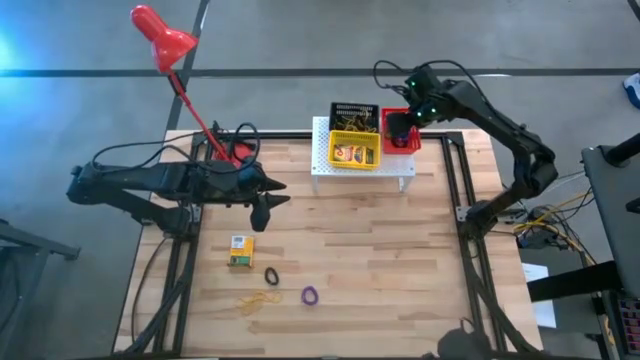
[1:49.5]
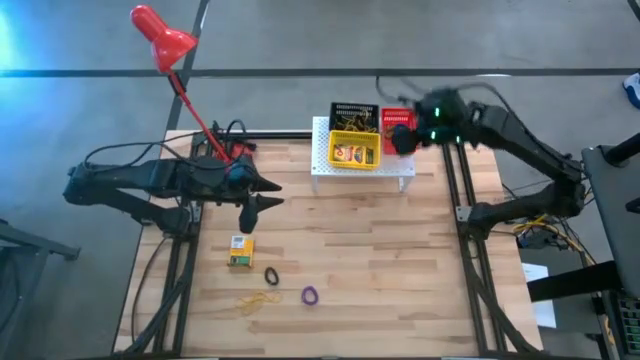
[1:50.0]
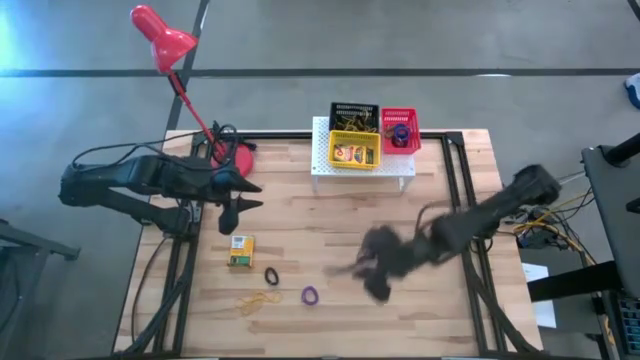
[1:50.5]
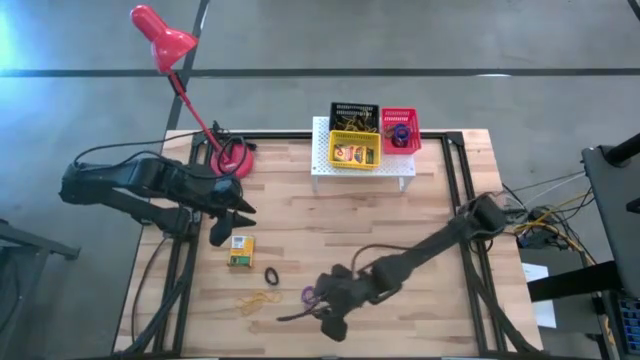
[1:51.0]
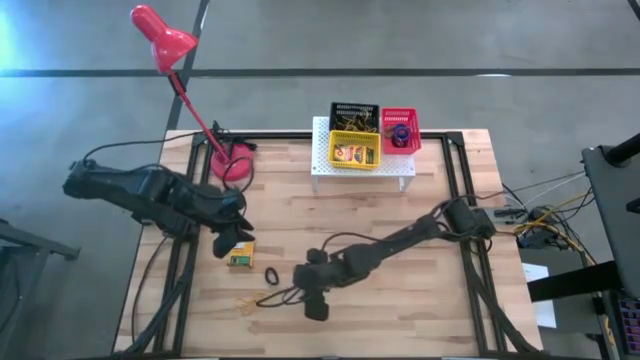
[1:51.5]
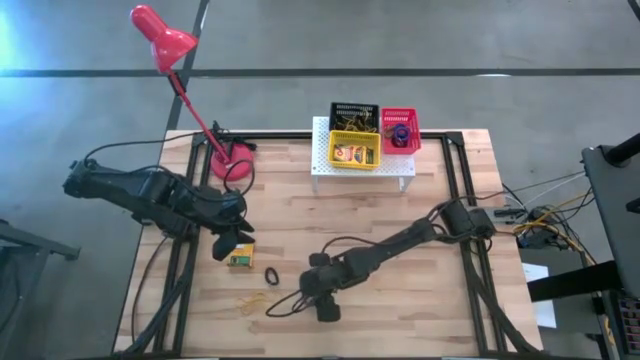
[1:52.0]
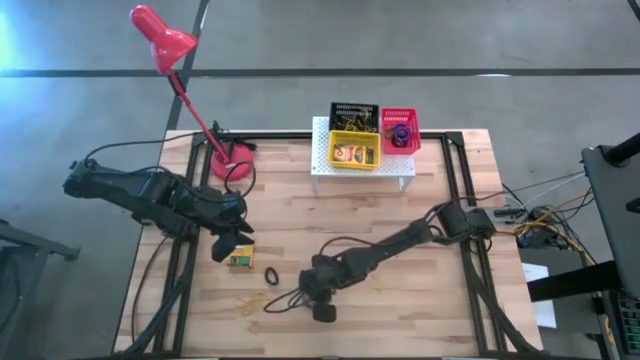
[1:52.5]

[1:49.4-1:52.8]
Task: Pick & Place Office Desk Supplies
Put the purple spring keychain in the red bin on the shelf

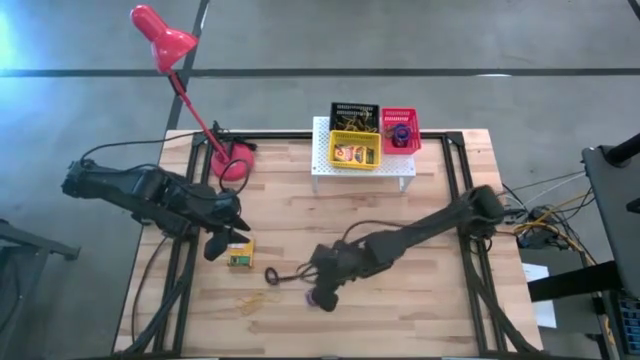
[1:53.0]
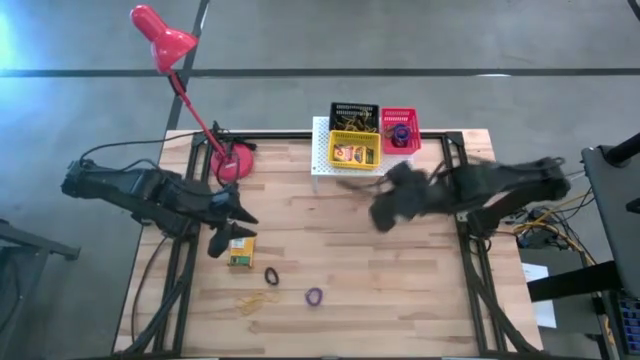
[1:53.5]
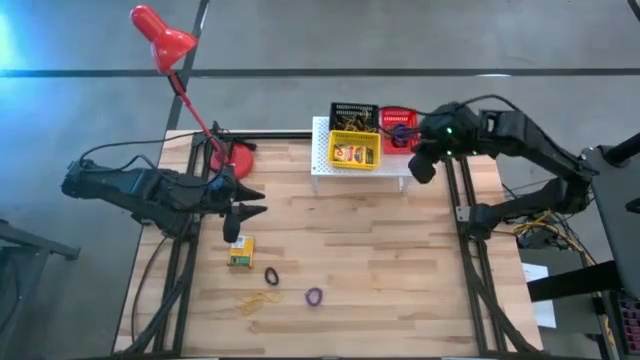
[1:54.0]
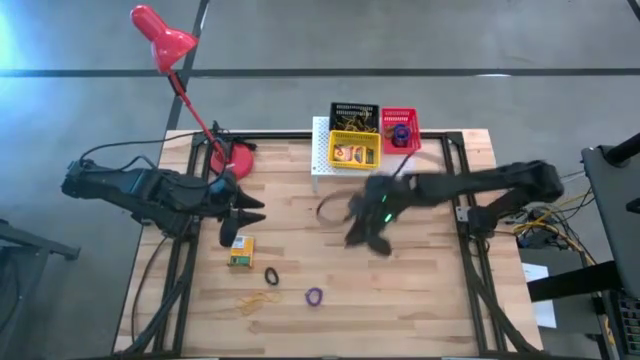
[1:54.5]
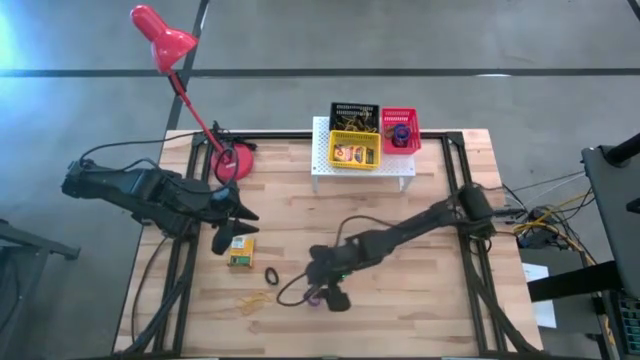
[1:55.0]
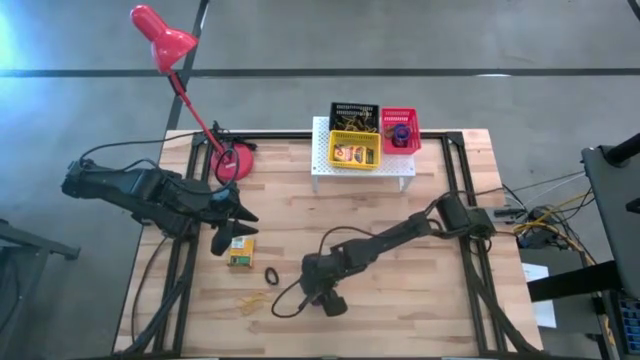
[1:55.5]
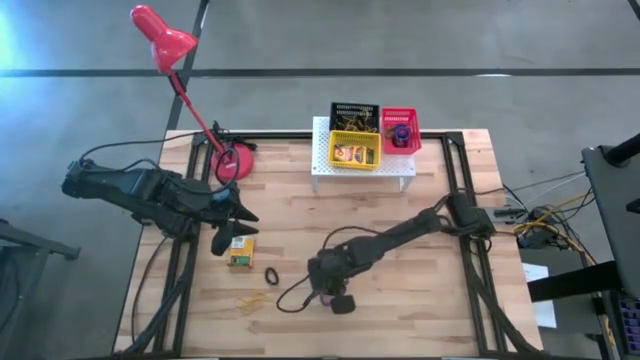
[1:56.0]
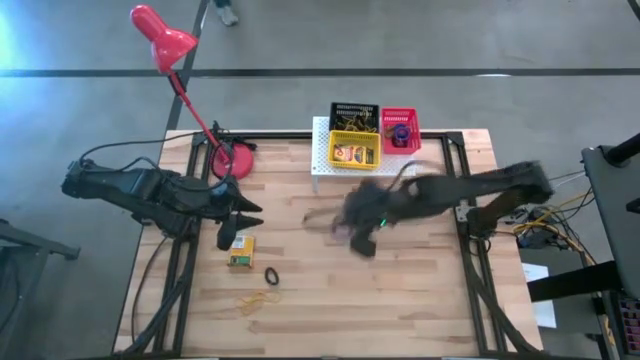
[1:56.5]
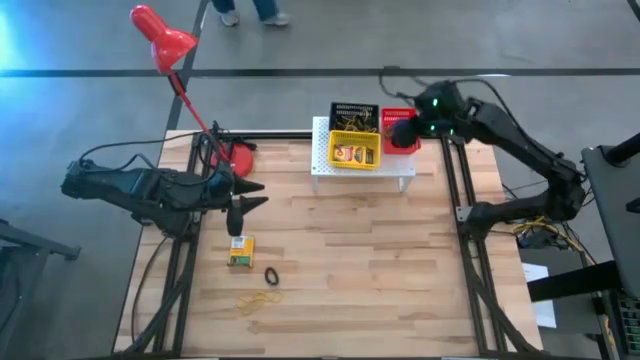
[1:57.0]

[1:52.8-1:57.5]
Put the purple spring keychain in the red bin on the shelf

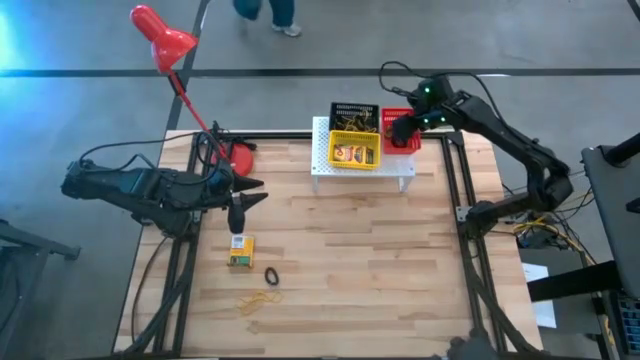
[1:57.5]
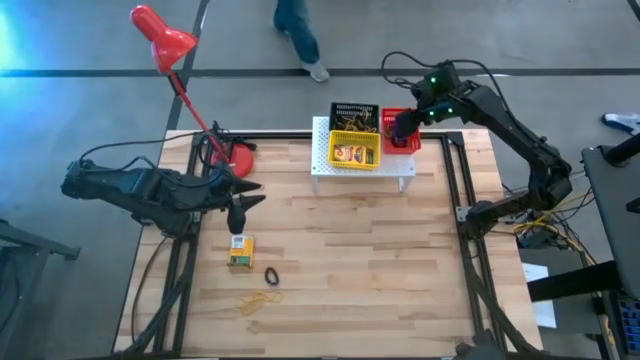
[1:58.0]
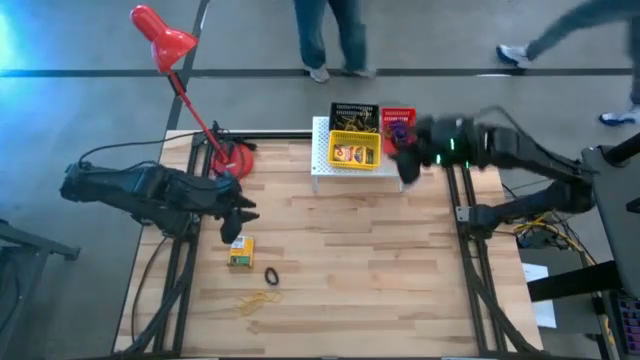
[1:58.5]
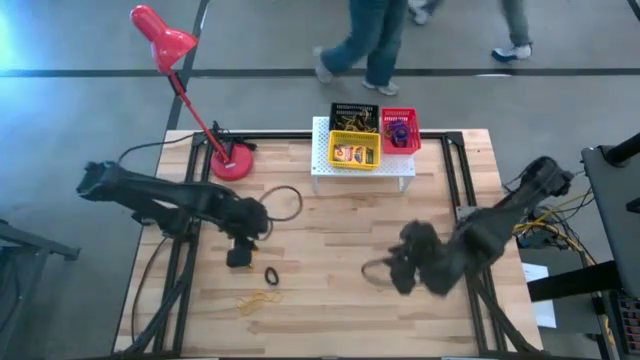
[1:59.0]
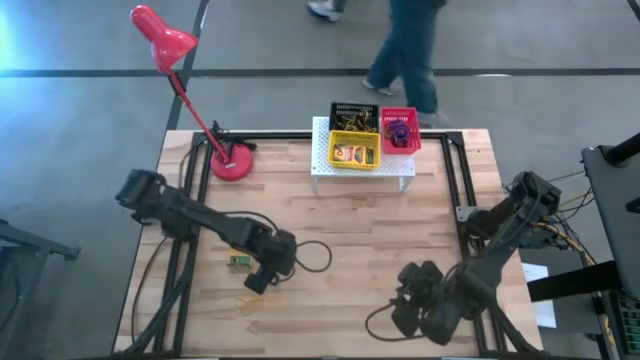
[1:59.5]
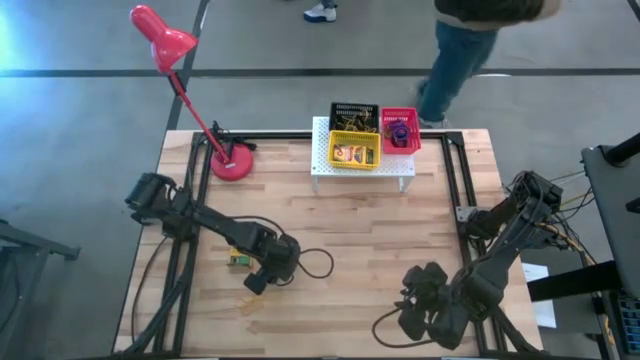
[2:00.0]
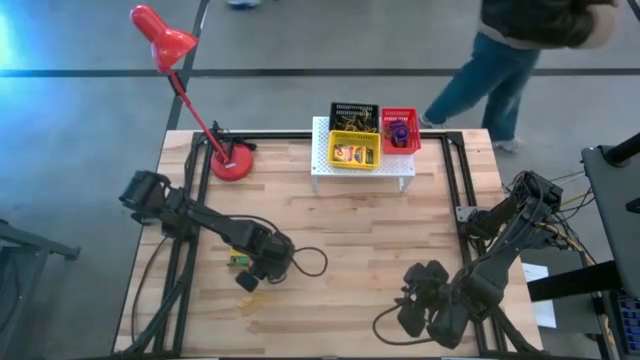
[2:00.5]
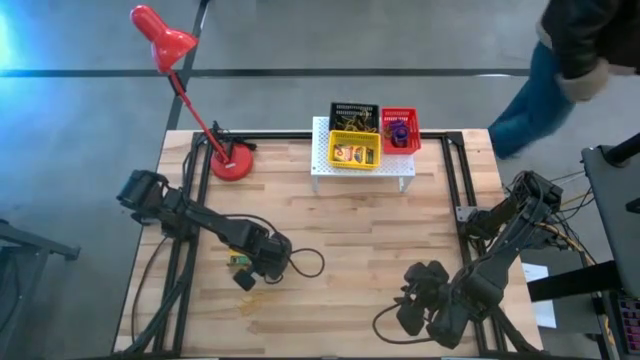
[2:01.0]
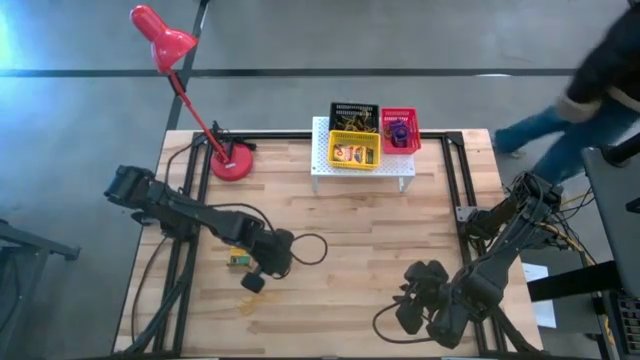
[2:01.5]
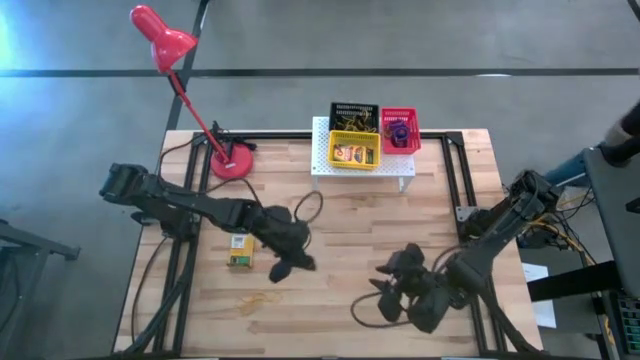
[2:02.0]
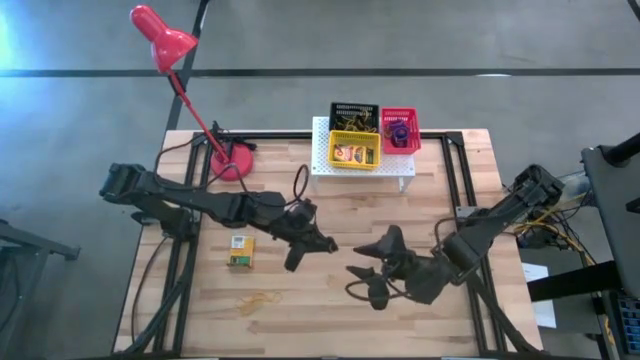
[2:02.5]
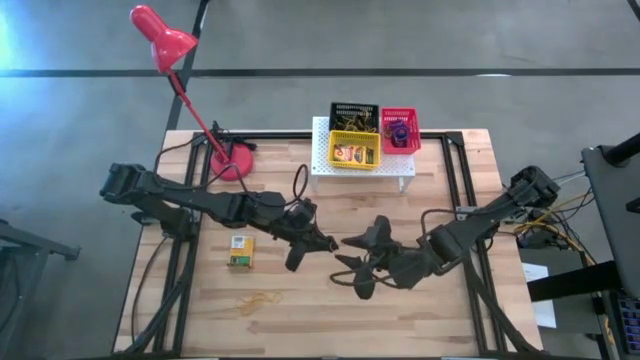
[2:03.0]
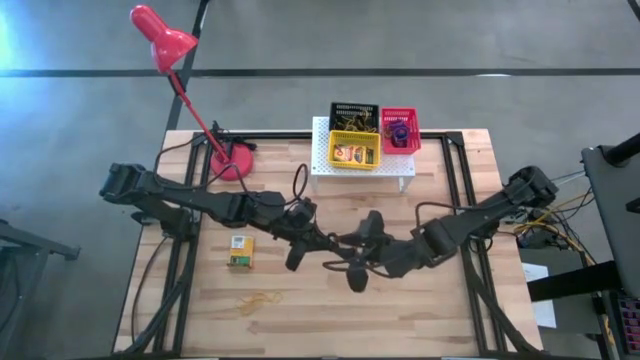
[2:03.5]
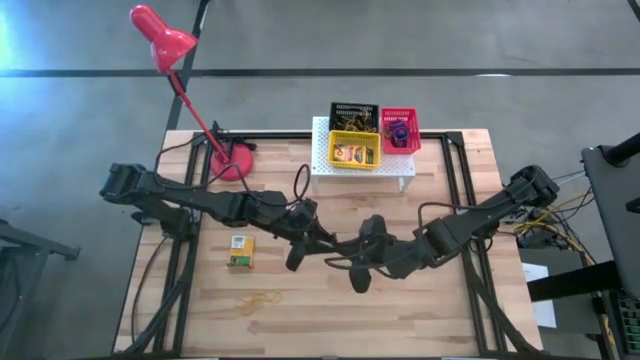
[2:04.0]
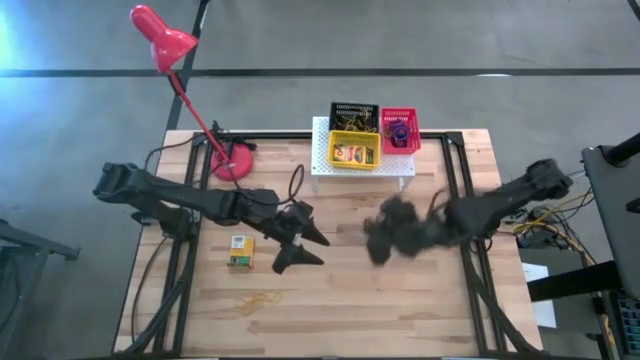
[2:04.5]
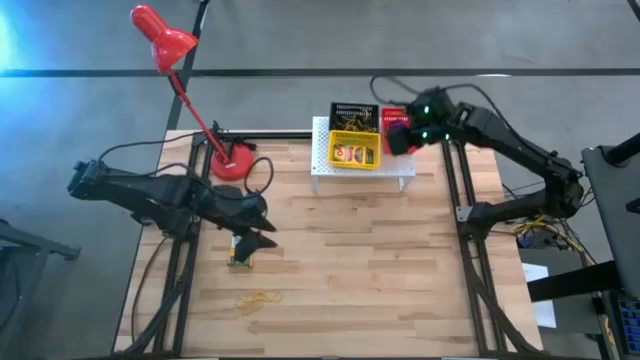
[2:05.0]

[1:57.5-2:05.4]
Put the black spring keychain in the red bin on the shelf

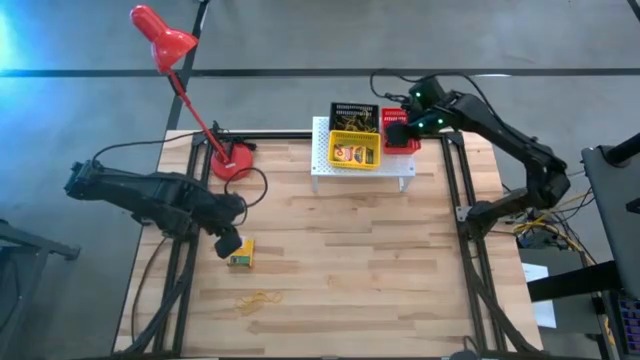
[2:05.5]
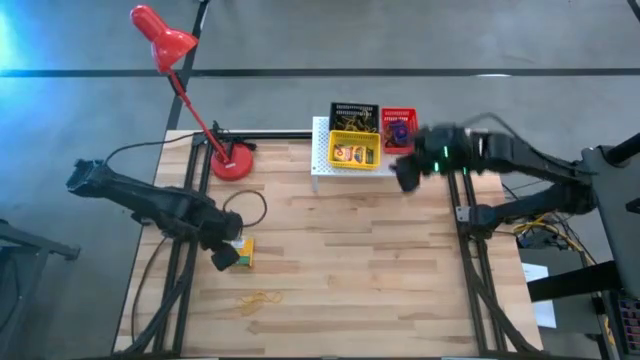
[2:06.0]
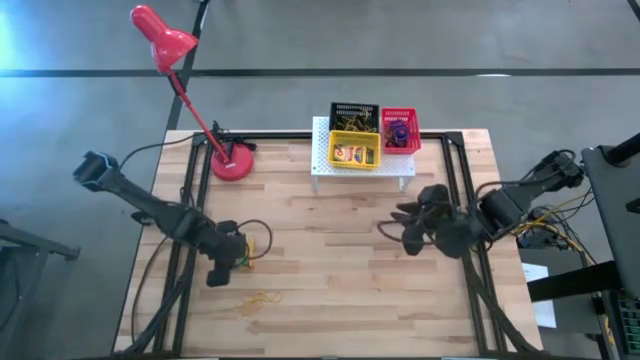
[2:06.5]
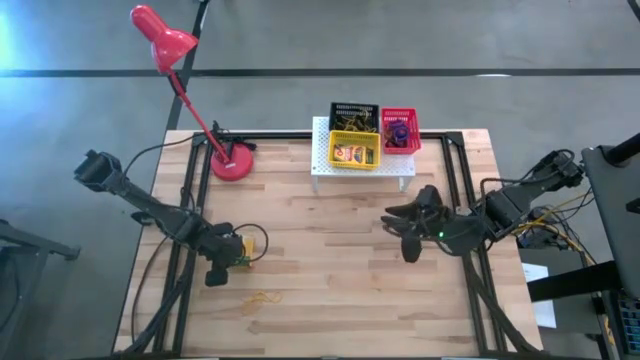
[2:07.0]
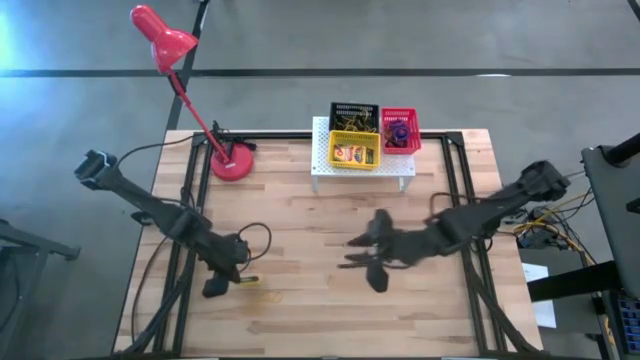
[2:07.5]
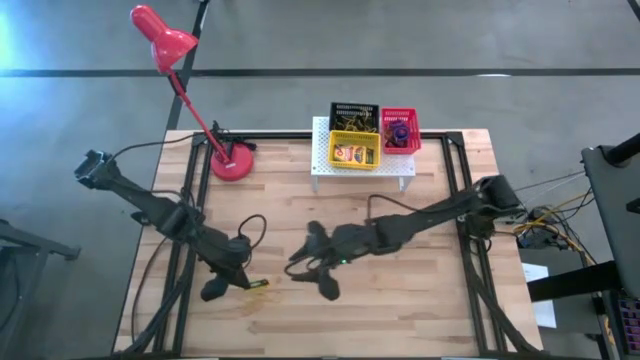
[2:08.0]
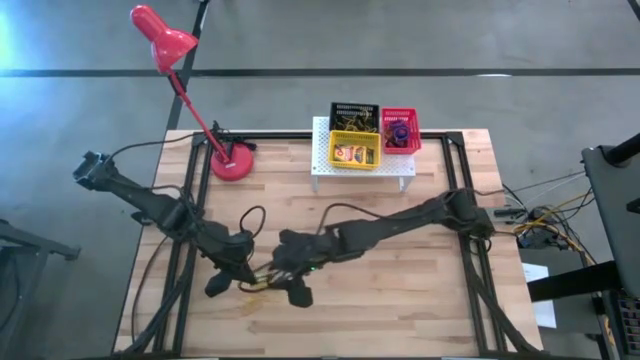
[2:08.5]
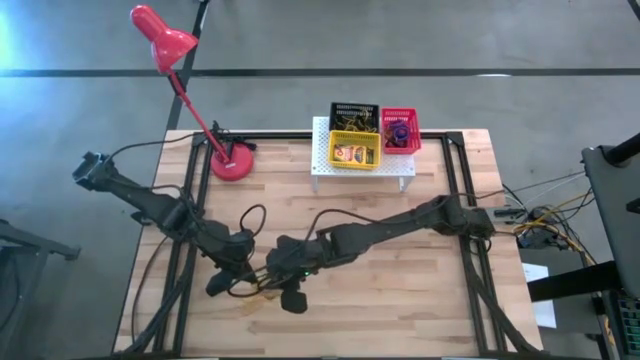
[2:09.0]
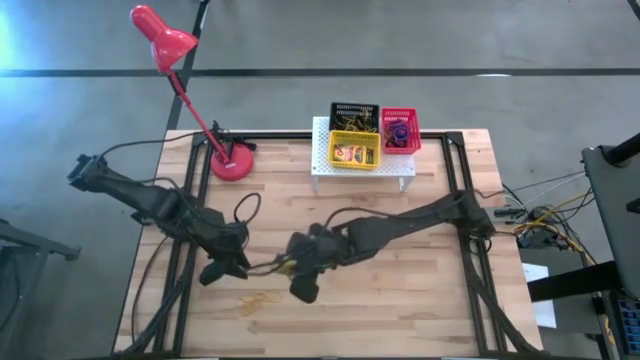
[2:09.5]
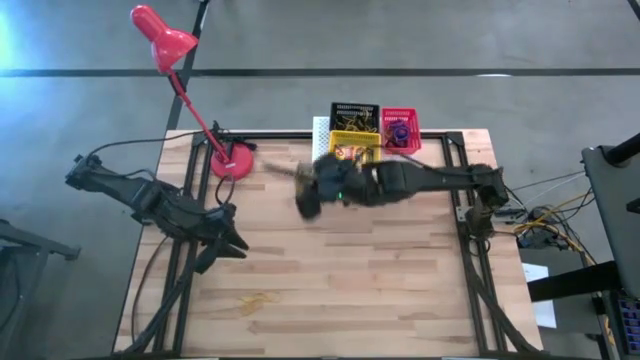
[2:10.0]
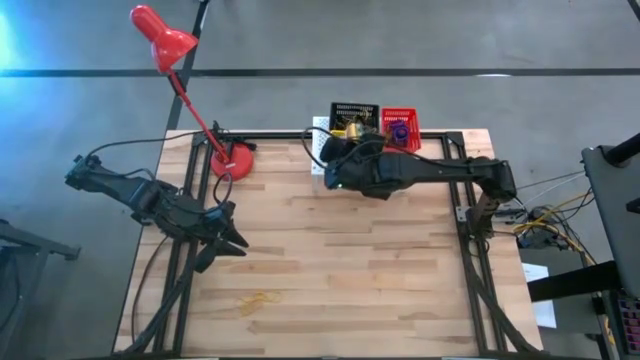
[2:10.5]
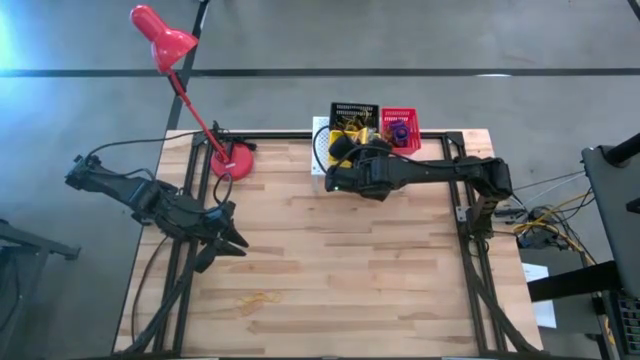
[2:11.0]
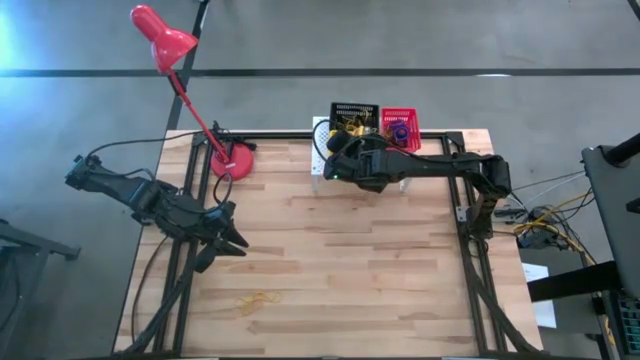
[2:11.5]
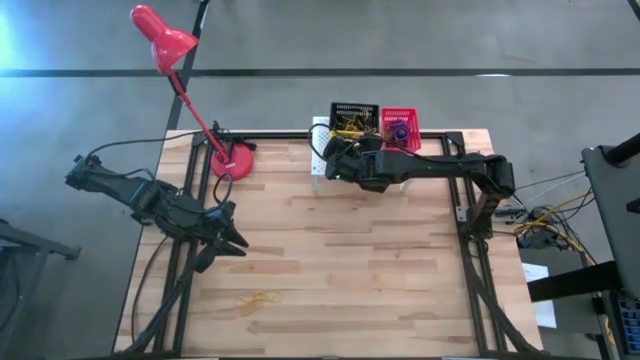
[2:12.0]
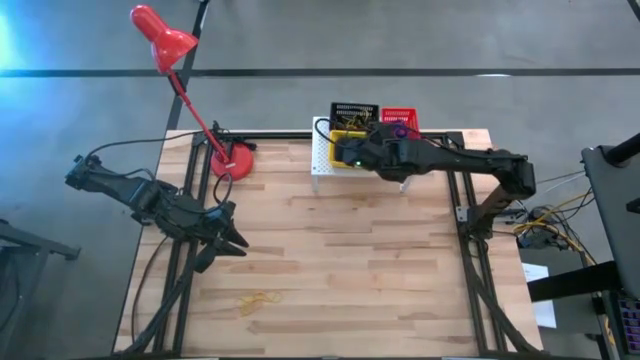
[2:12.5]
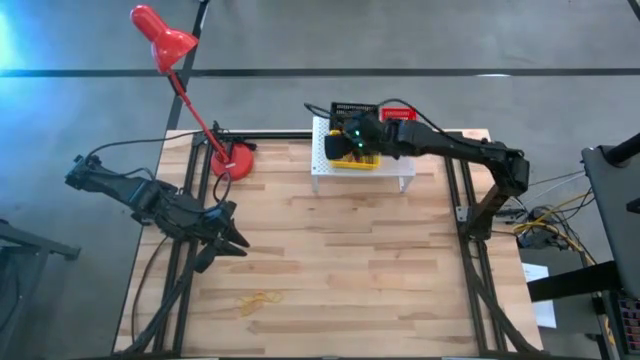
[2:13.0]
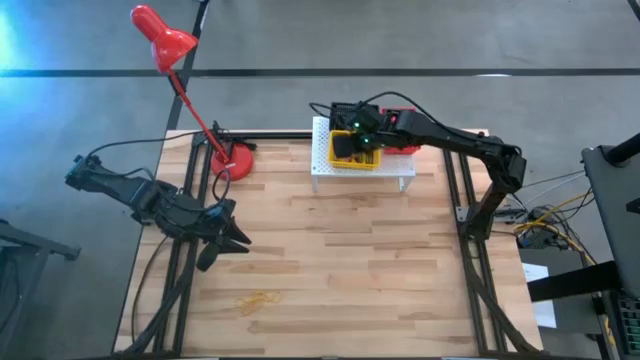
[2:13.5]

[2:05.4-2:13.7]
Put the yellow crayon box in the yellow bin on the shelf
